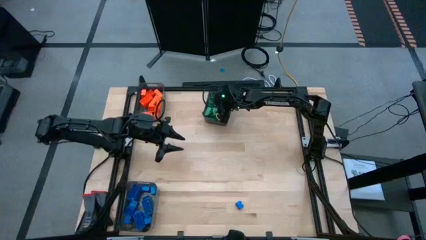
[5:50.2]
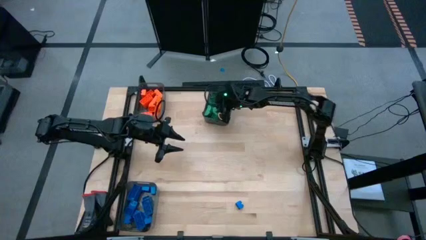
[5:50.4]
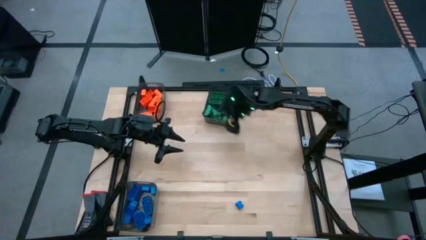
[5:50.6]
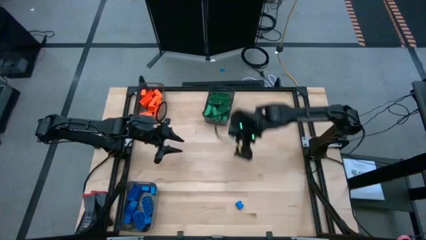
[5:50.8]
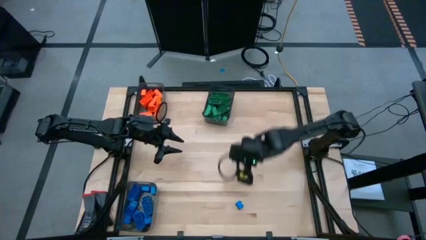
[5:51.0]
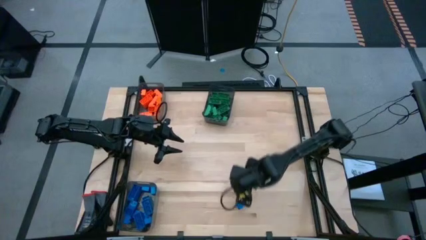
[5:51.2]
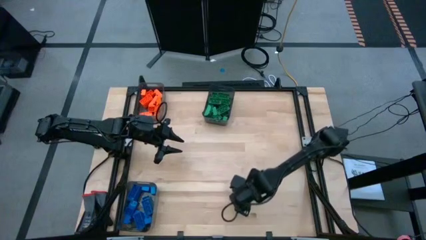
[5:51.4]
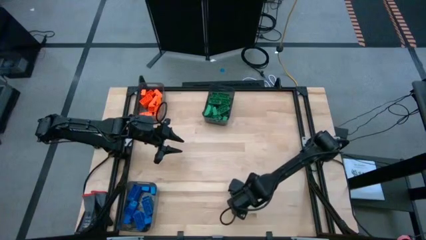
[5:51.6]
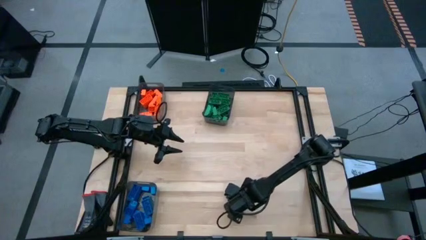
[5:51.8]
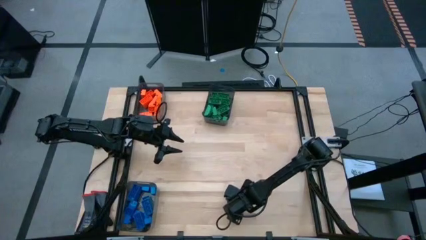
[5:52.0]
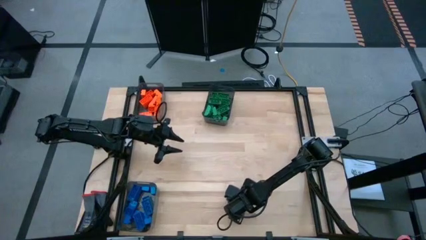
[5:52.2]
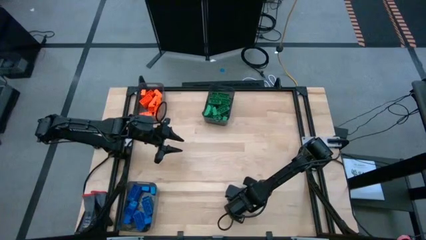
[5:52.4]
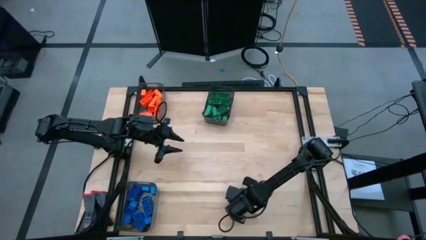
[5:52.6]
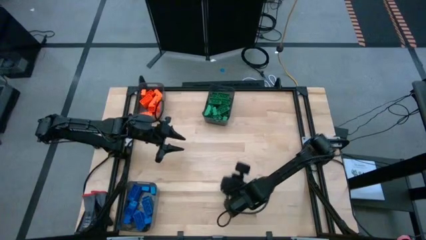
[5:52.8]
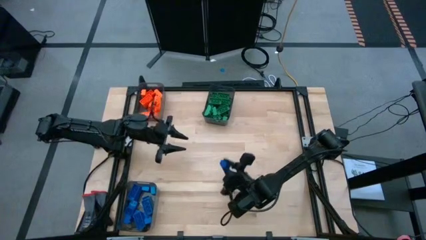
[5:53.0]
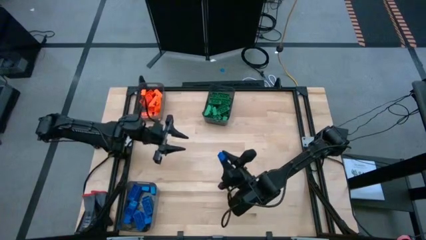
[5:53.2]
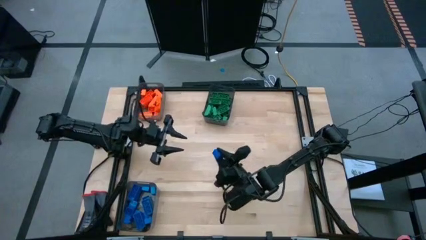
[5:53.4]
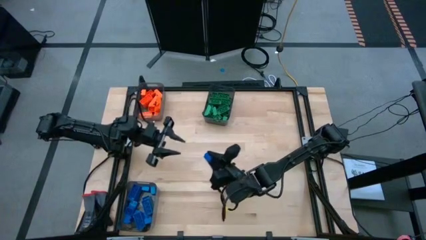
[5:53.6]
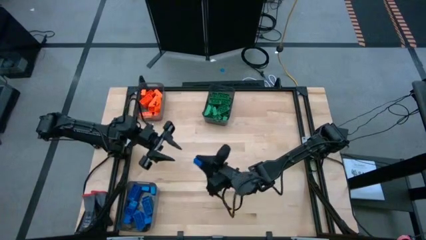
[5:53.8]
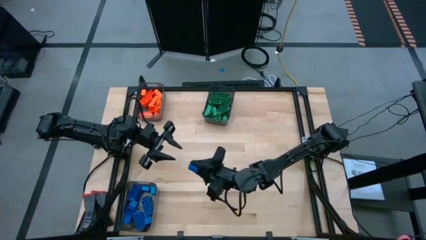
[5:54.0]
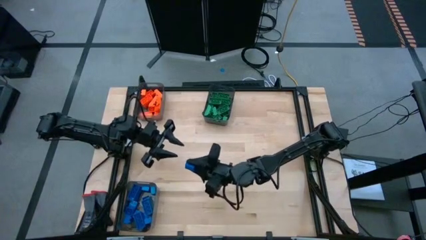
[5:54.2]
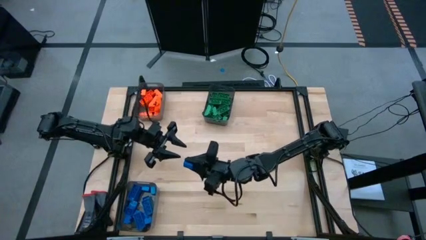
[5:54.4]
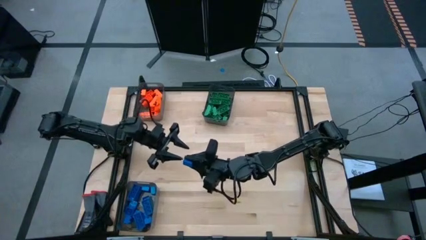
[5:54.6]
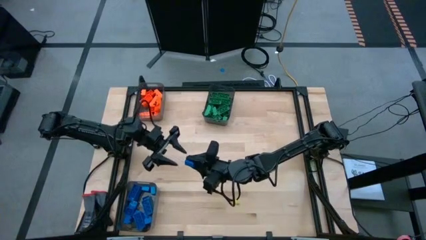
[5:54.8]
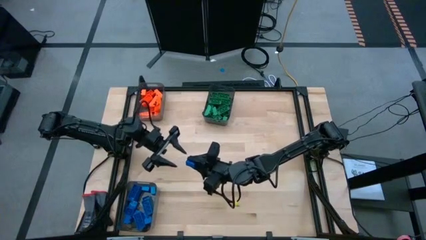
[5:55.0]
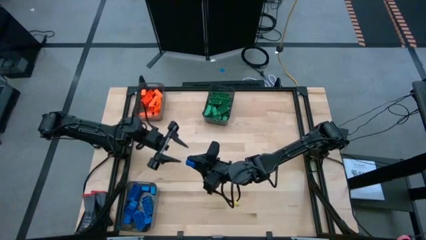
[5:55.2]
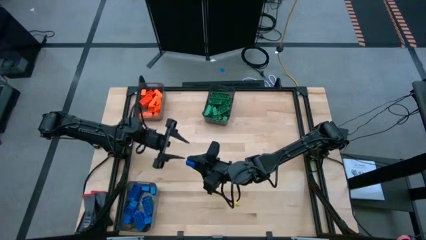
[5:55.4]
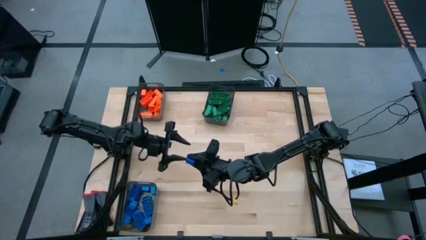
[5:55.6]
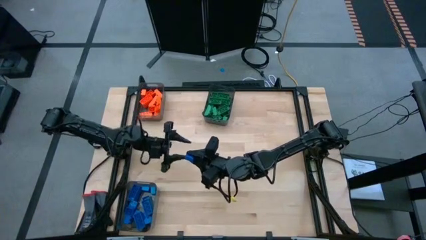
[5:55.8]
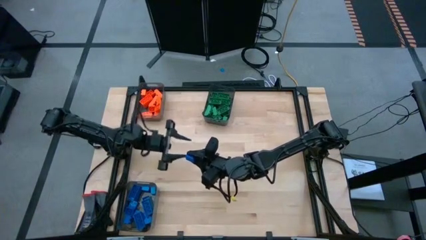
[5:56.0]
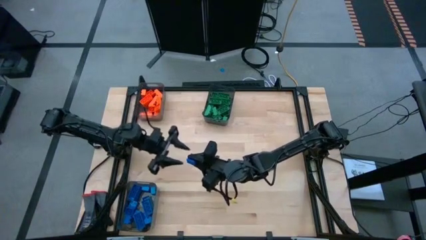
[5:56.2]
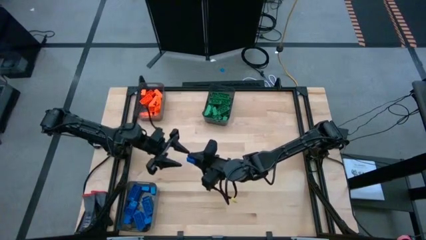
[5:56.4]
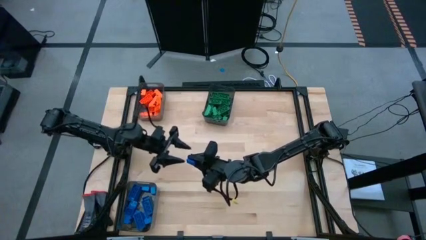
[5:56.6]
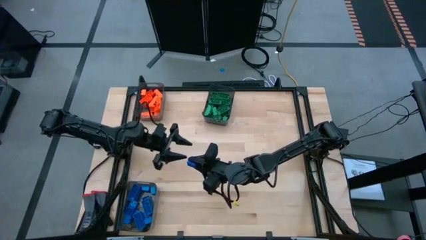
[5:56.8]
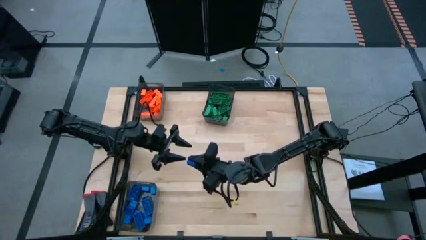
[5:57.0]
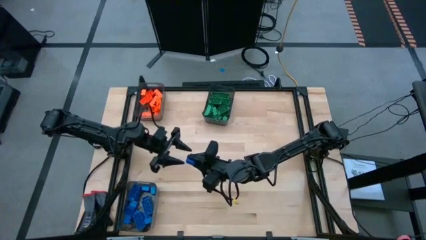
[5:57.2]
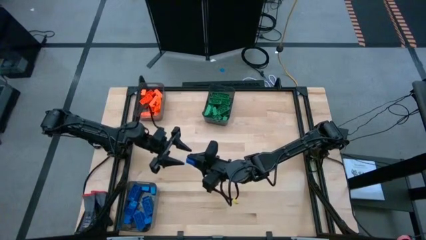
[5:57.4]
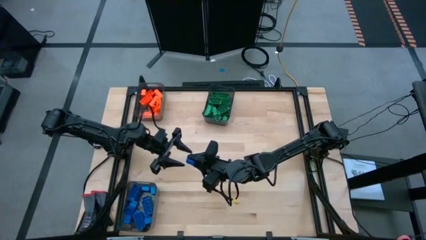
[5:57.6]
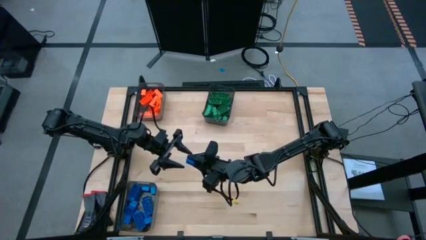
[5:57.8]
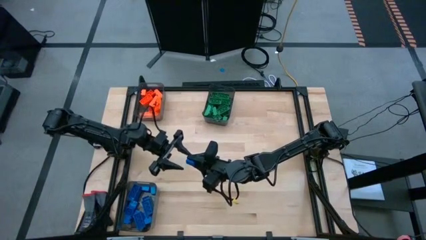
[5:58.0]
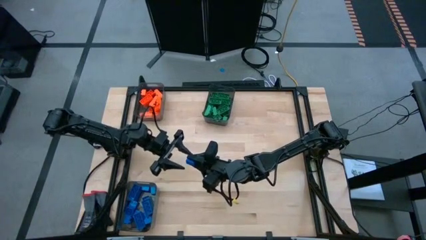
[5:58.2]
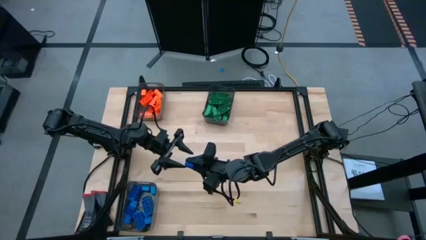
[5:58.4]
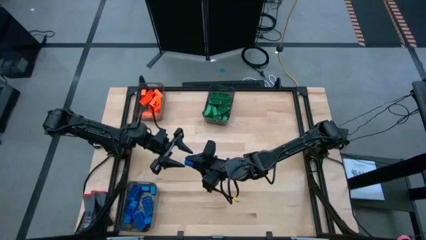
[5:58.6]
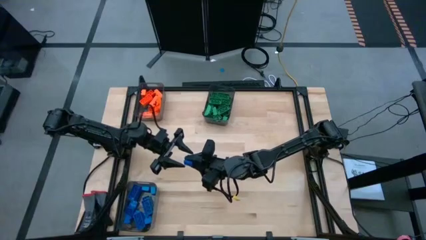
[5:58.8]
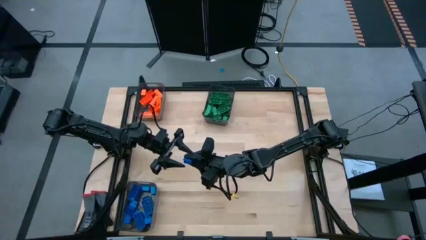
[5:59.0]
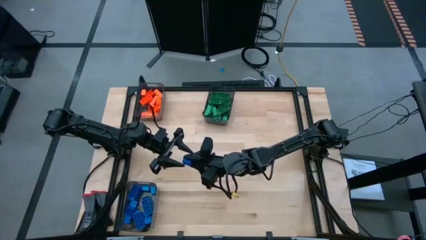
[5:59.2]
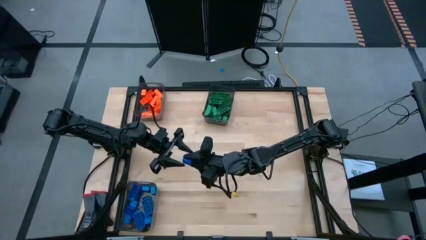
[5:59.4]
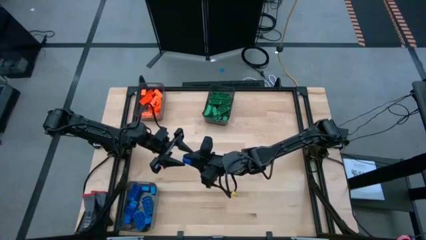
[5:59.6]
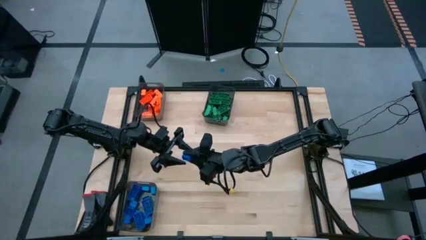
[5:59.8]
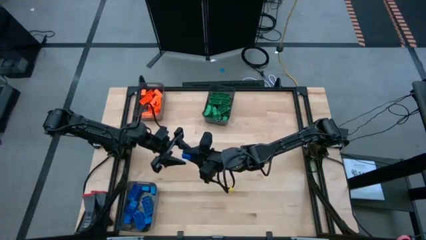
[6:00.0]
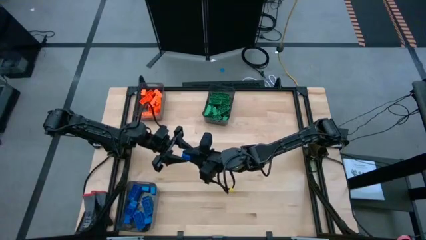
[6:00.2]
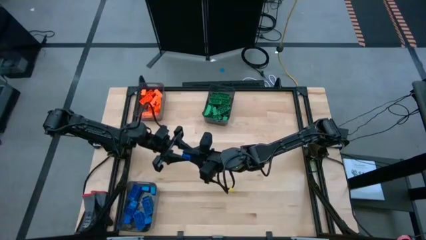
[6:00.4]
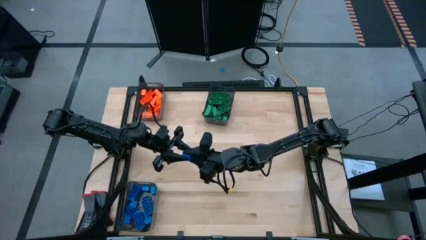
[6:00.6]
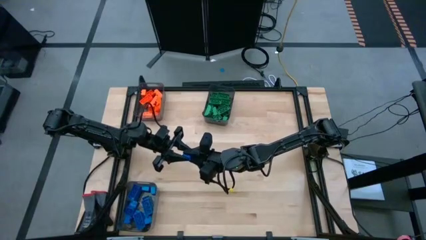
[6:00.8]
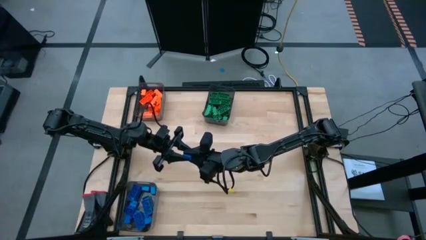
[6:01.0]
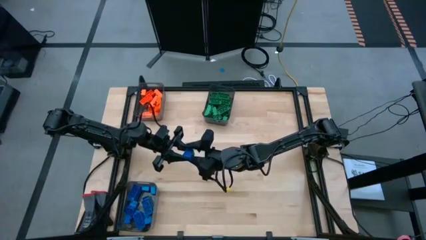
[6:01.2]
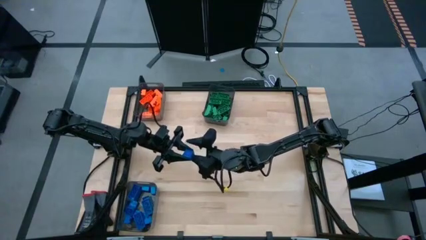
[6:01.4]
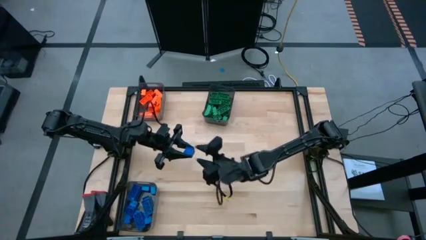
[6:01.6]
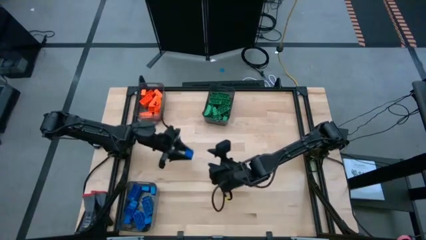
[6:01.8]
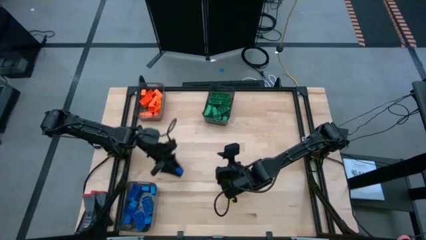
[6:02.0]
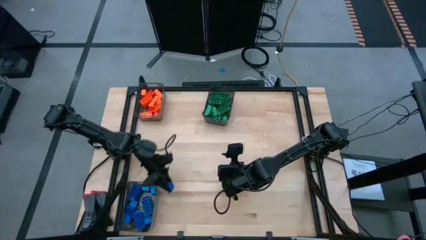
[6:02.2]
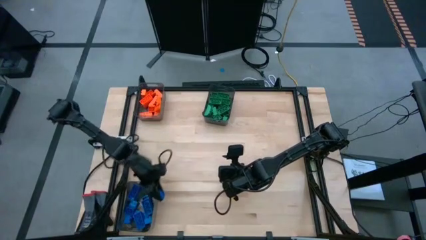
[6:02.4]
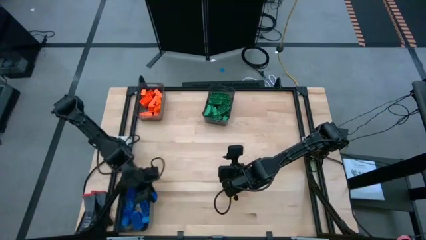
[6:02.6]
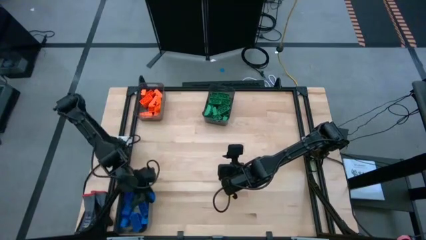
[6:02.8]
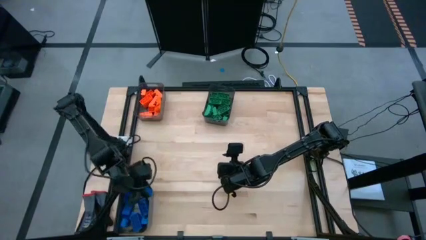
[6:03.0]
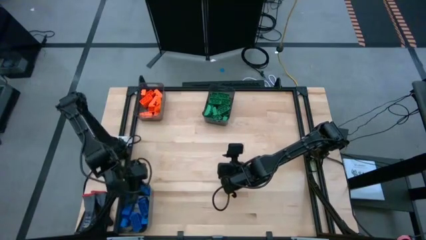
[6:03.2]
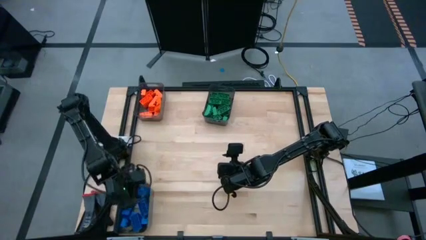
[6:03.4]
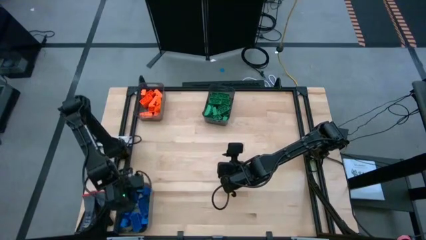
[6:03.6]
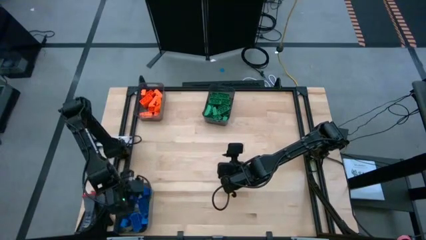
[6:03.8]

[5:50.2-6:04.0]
Task: Sort blocks
Put the blue game piece into the bottom left black transparent bin

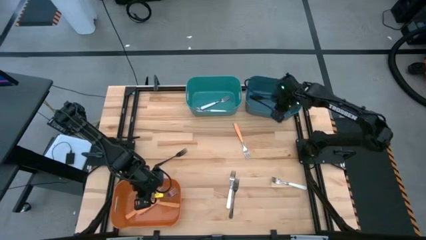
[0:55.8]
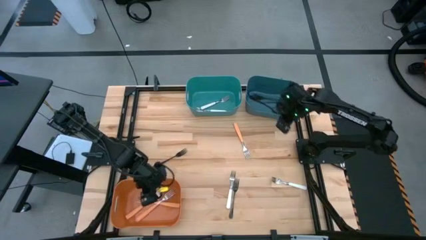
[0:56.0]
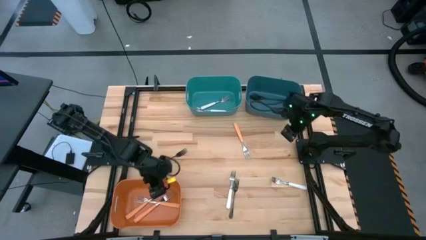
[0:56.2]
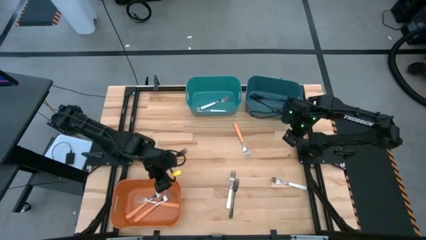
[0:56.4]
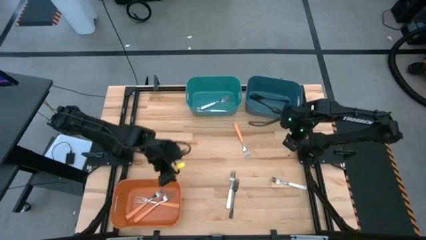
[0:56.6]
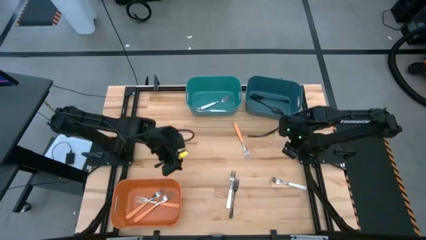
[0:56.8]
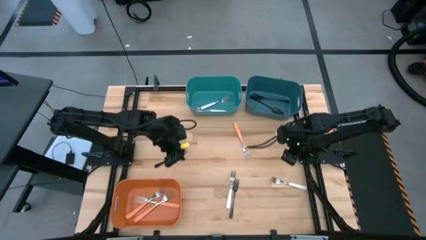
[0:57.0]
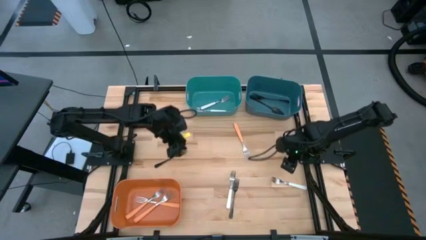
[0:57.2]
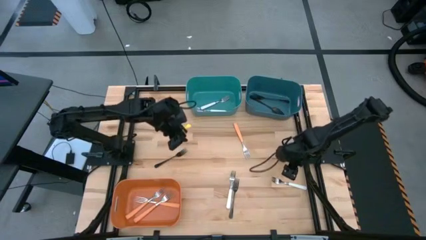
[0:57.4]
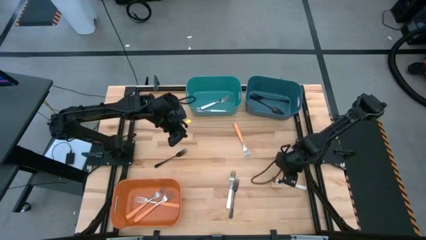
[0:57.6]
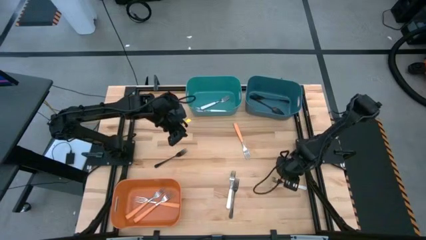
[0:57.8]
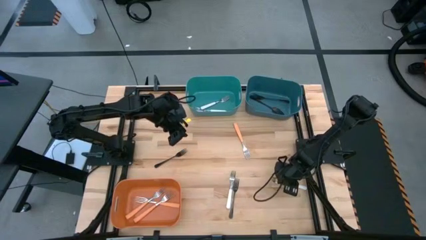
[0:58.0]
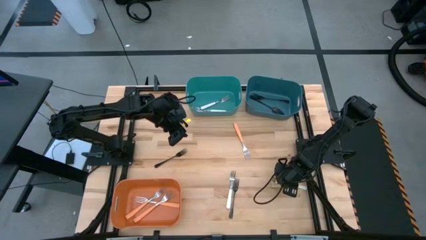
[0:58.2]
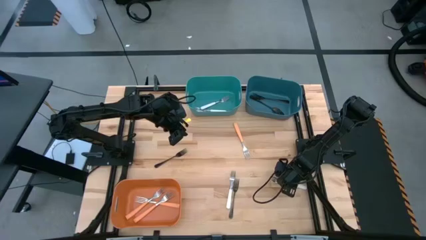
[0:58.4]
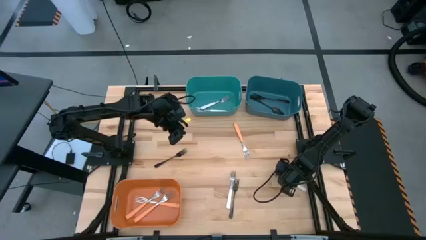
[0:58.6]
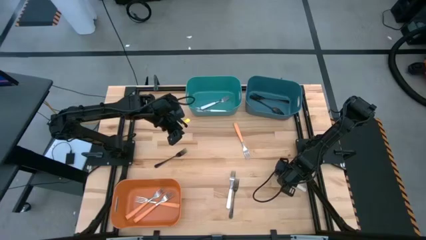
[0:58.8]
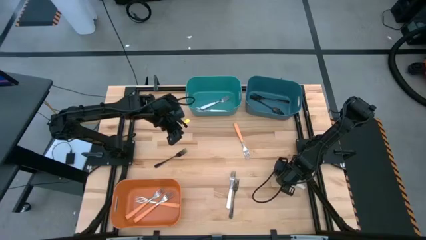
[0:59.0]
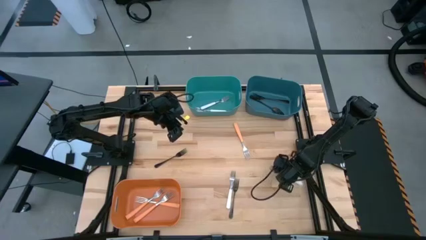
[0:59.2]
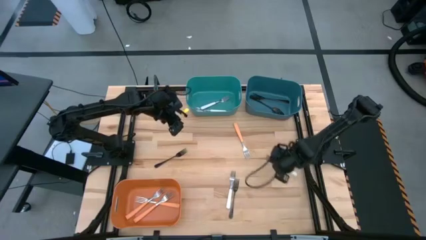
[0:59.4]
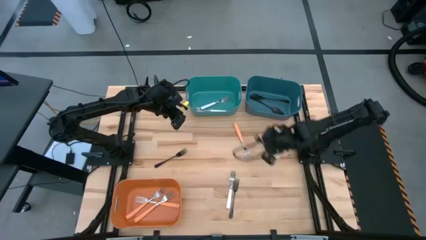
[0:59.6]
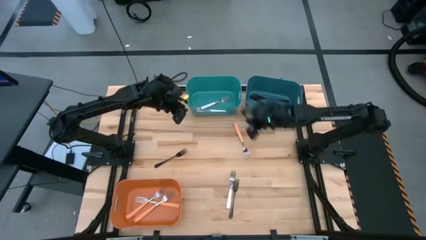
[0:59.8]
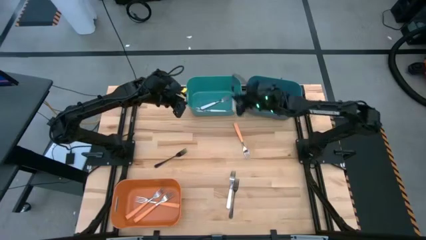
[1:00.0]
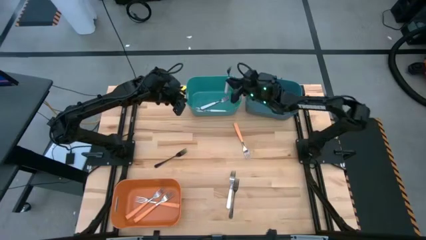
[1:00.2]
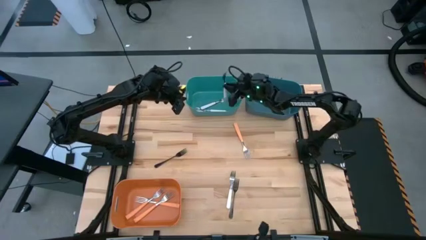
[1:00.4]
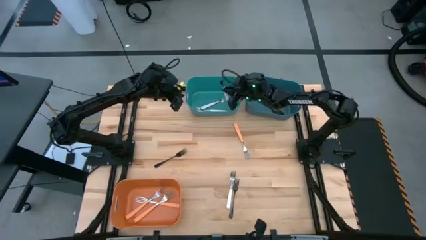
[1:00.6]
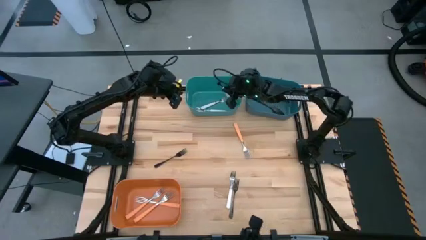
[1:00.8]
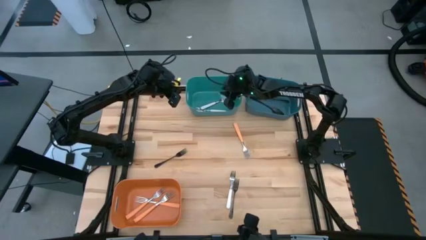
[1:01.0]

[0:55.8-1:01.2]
Task: Sort silverware by color (type)
Put the right white fork into the green bin
